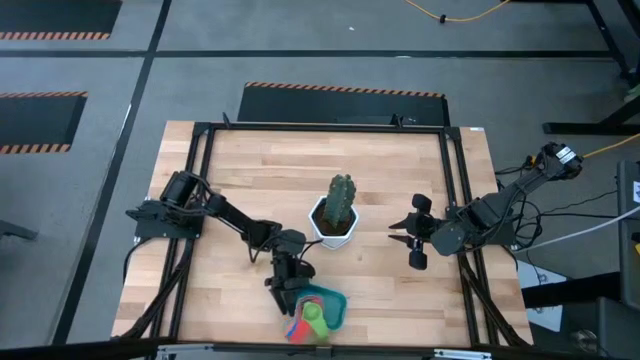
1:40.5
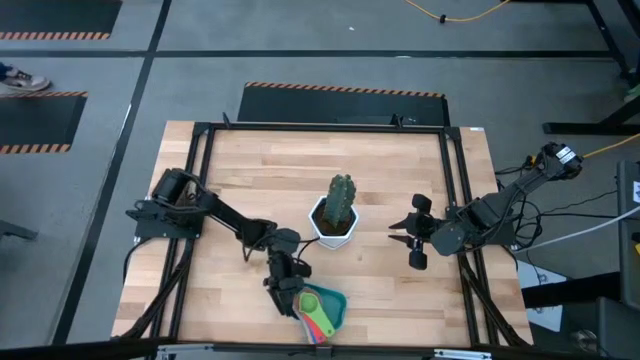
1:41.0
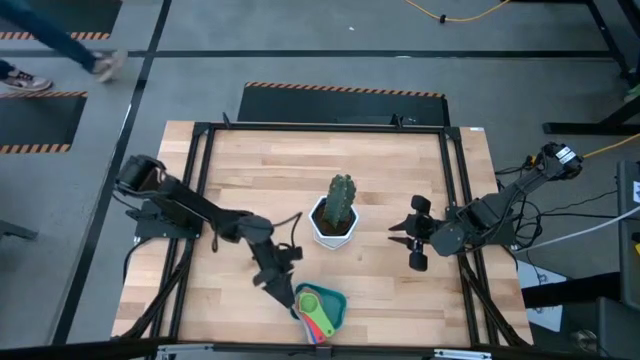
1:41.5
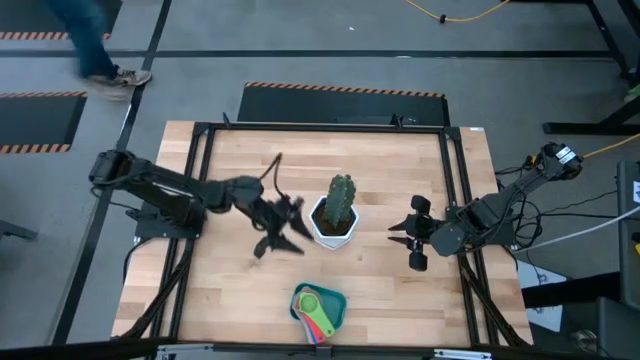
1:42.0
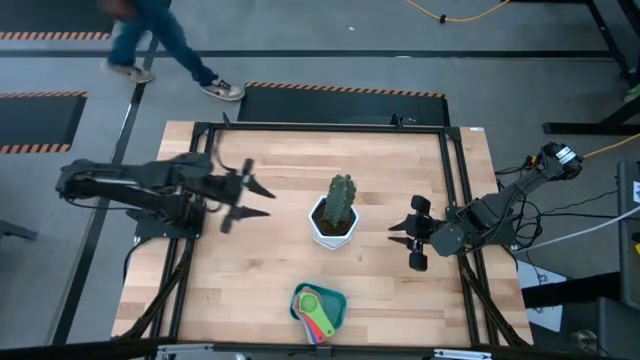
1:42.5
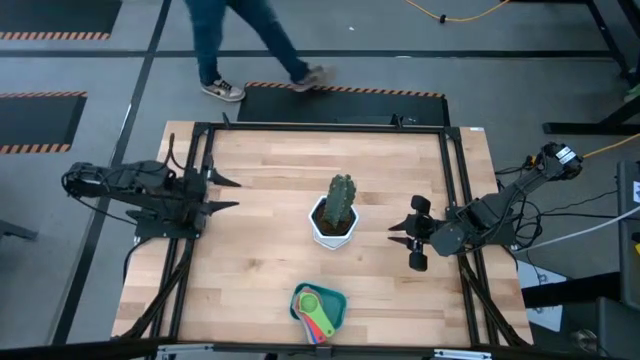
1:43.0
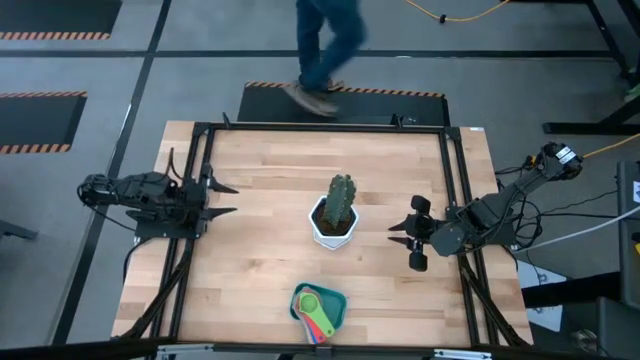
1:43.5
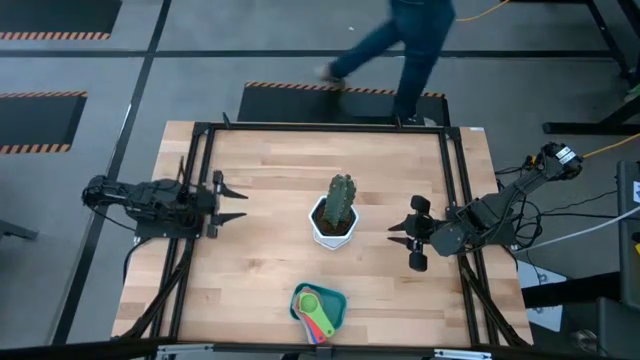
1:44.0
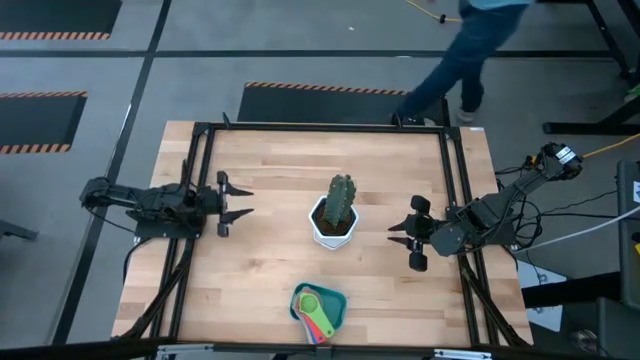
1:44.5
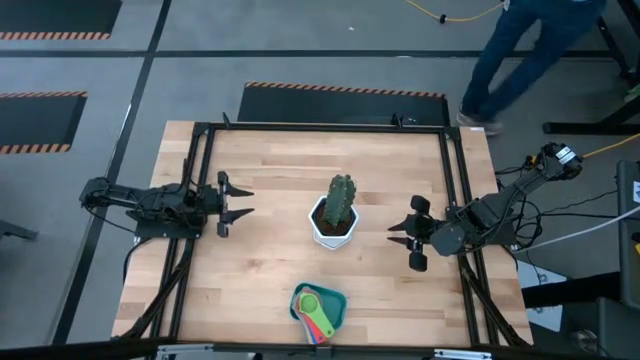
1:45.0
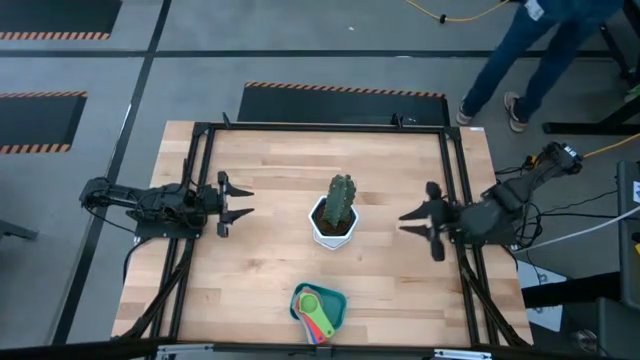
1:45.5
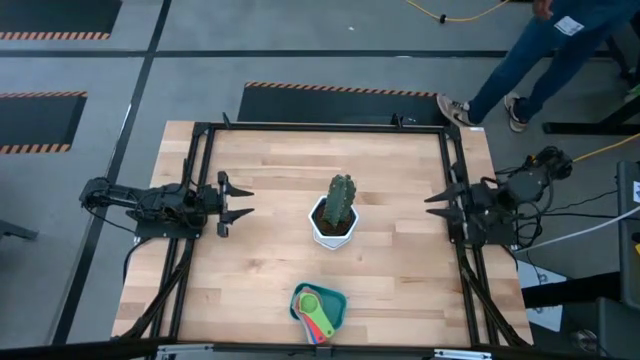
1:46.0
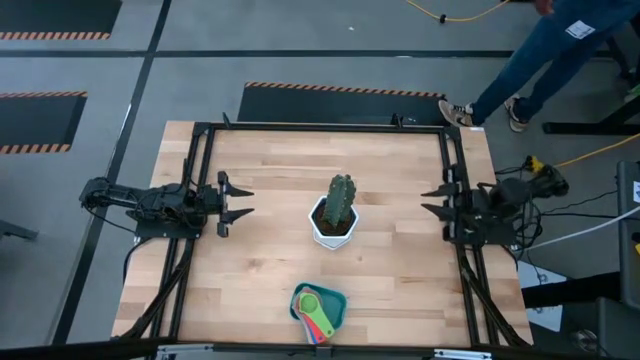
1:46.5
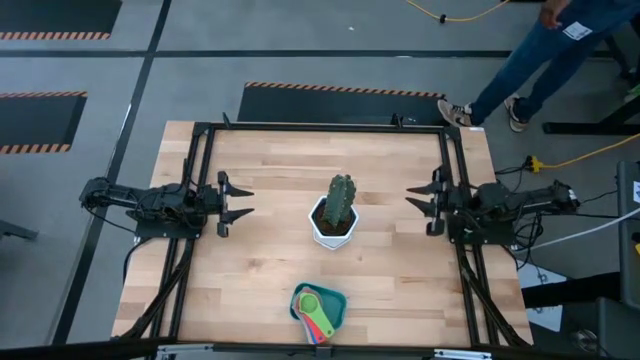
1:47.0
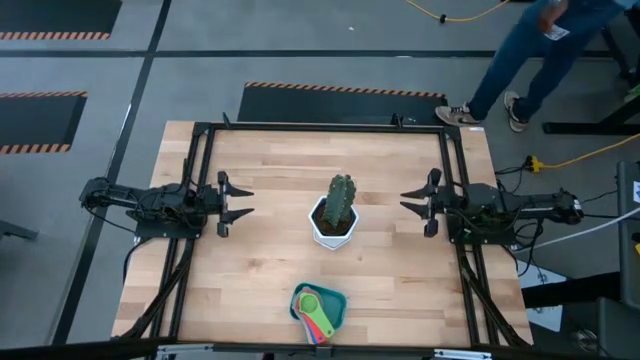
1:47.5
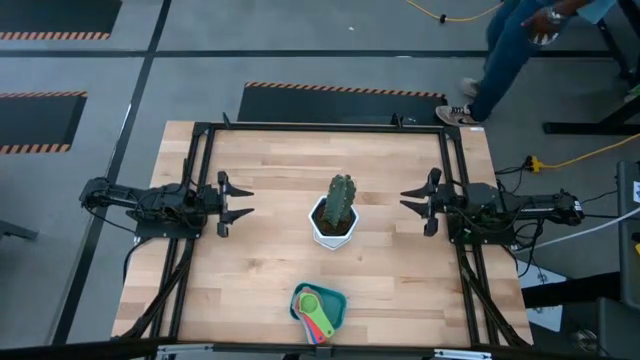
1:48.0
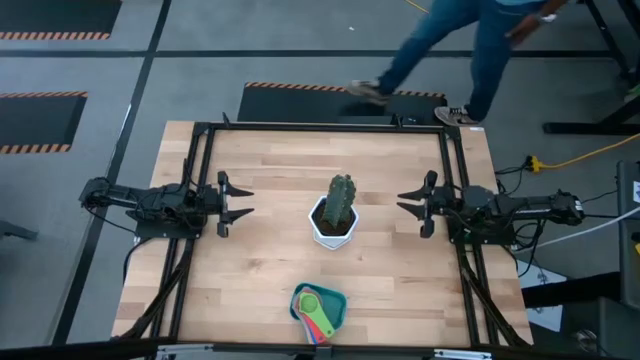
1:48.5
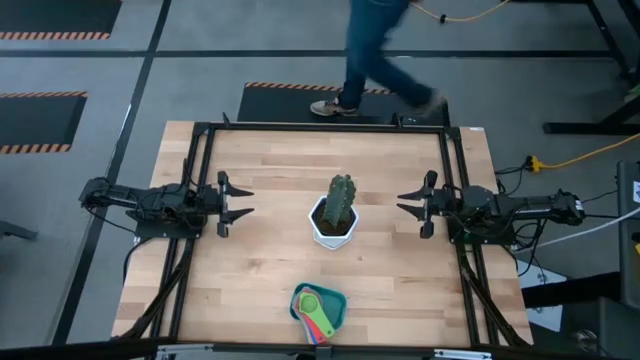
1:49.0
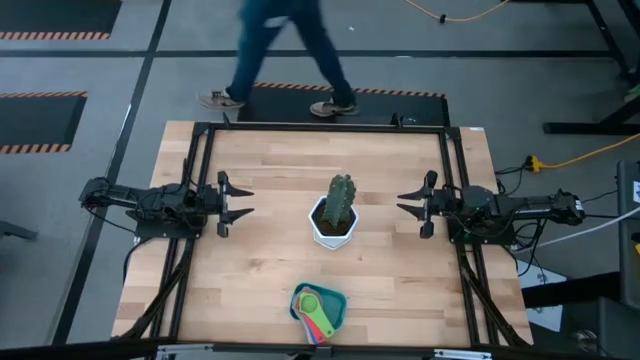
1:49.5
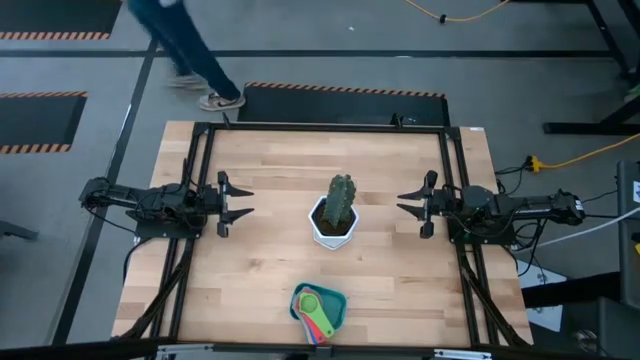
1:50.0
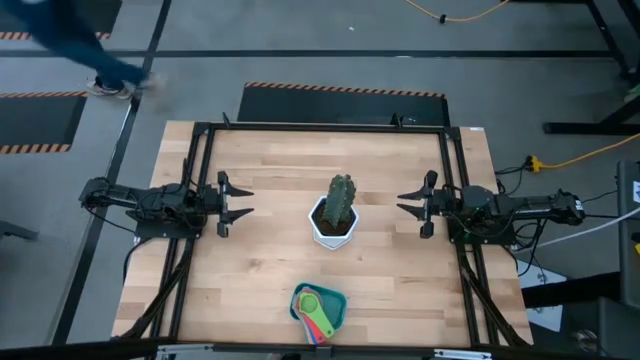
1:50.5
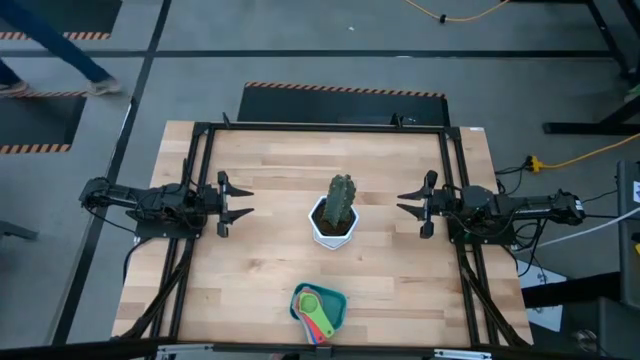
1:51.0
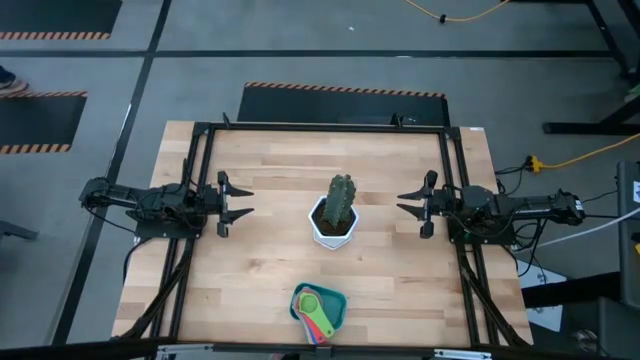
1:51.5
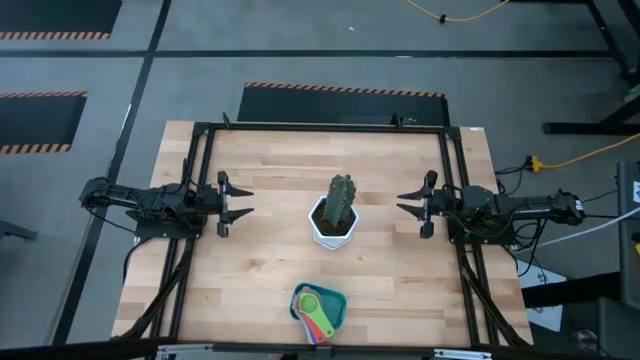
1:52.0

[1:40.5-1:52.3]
Task: Nest measuring cups in basket
Return to Home Position

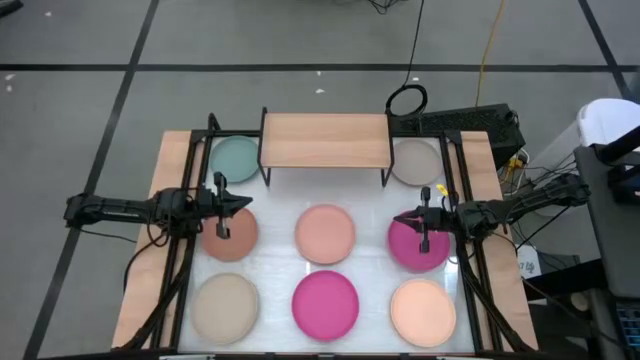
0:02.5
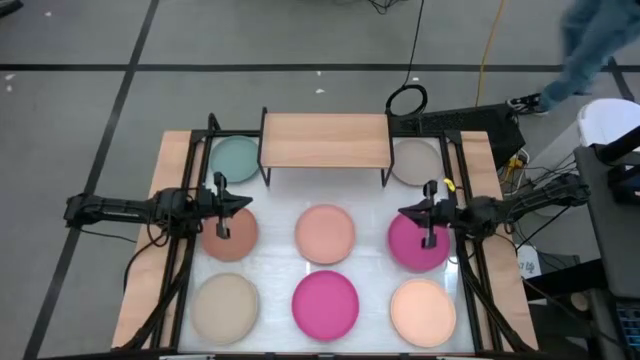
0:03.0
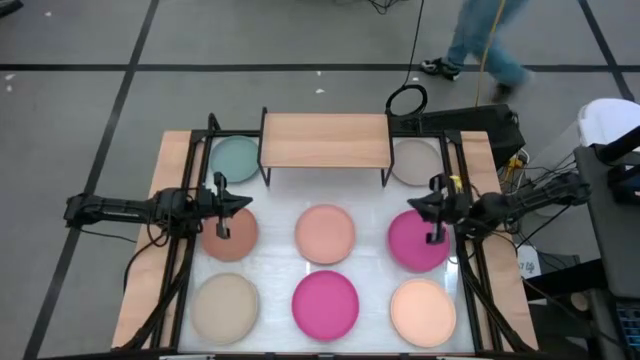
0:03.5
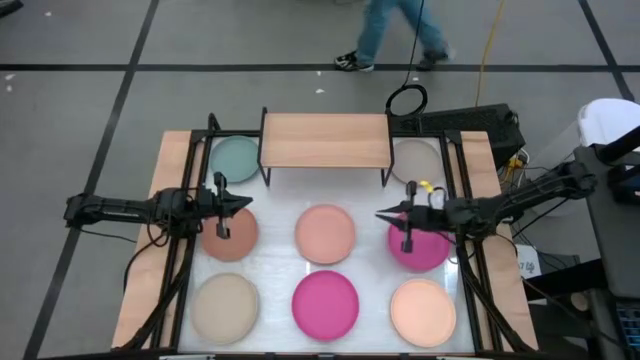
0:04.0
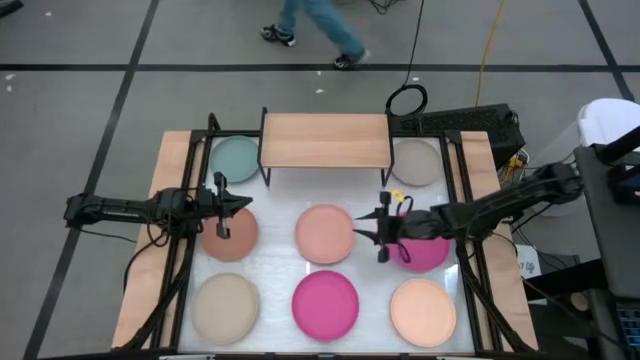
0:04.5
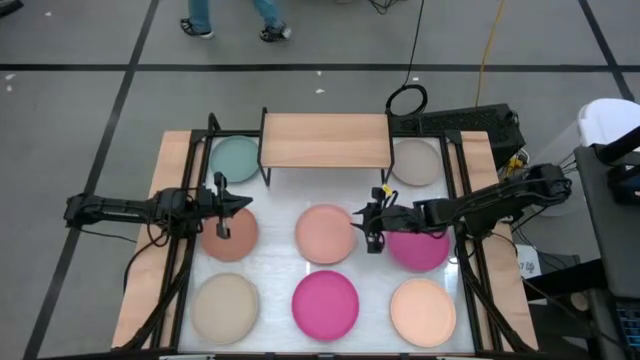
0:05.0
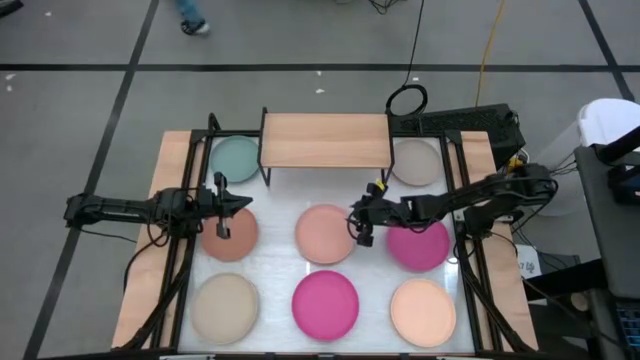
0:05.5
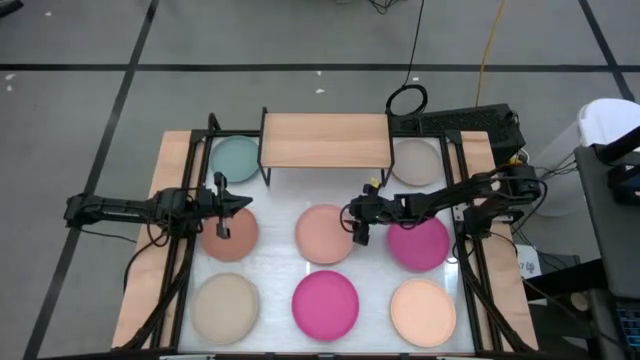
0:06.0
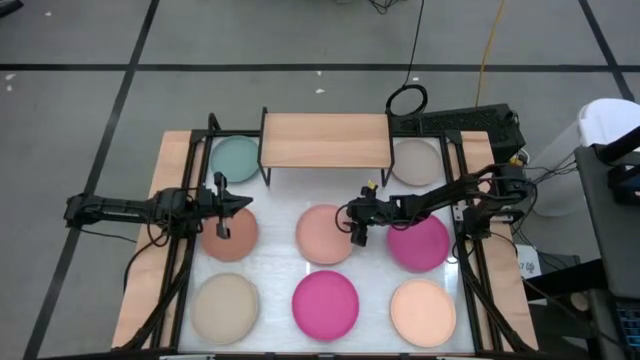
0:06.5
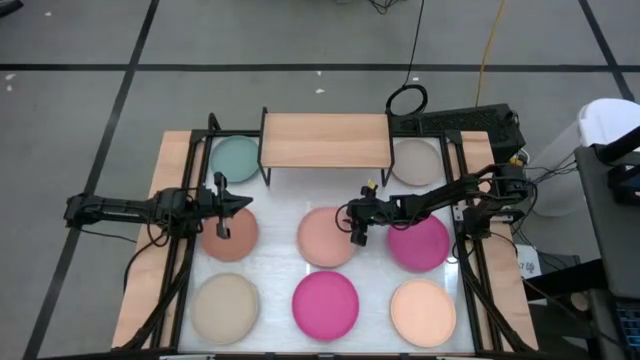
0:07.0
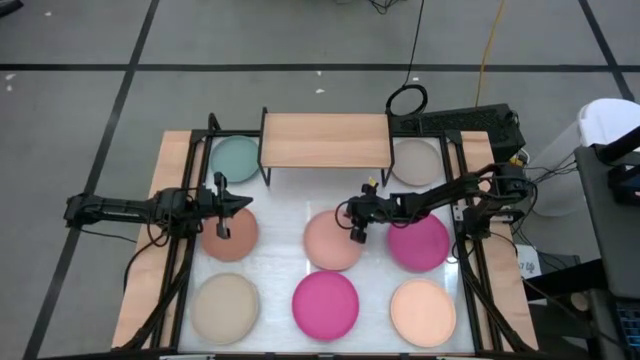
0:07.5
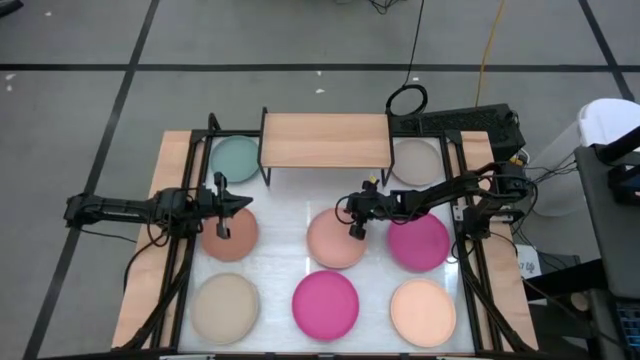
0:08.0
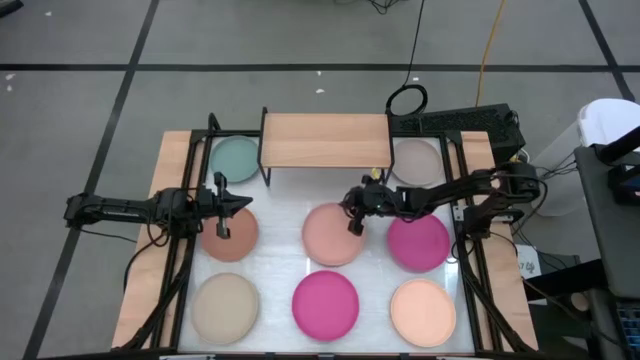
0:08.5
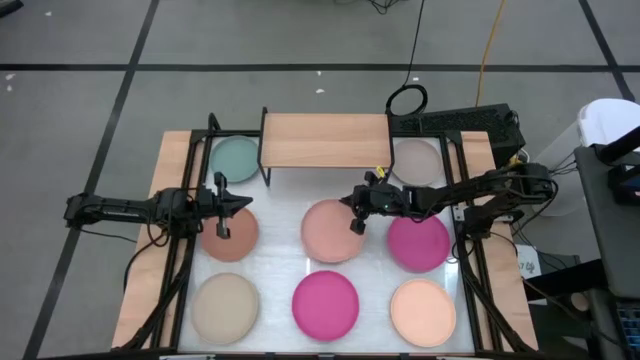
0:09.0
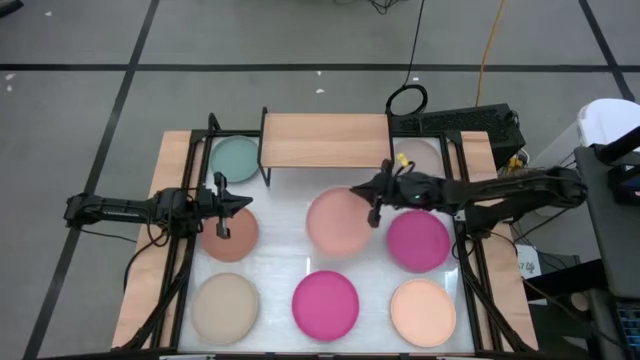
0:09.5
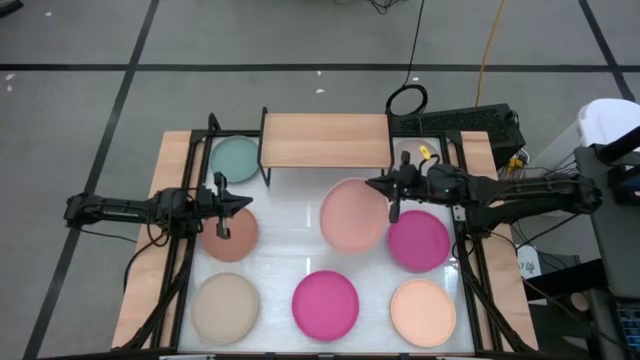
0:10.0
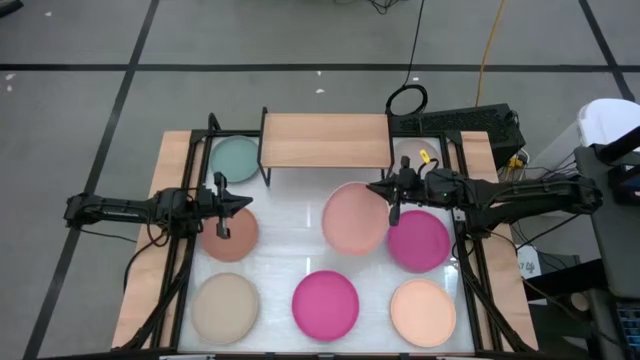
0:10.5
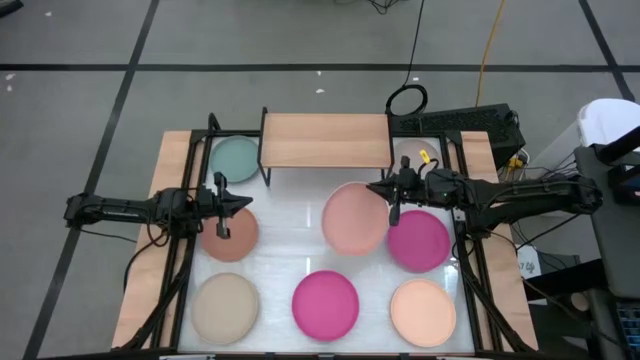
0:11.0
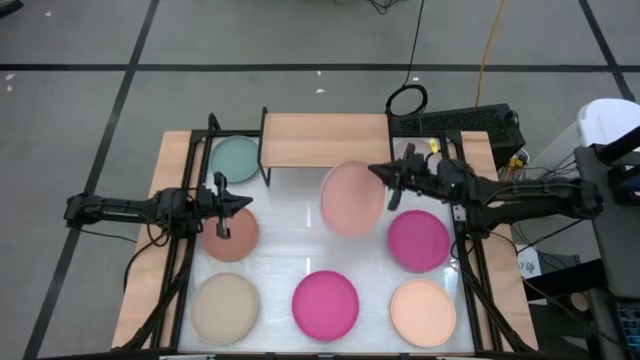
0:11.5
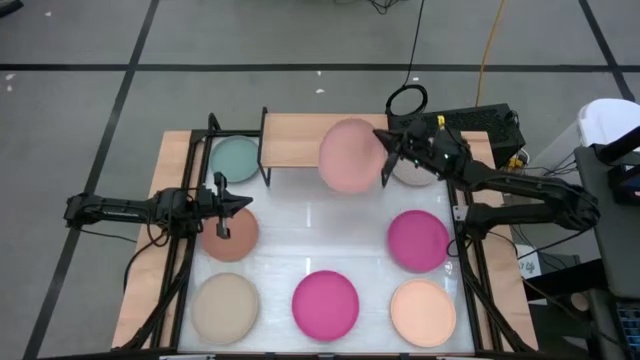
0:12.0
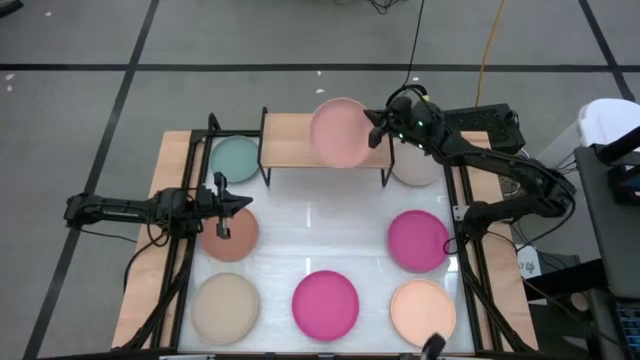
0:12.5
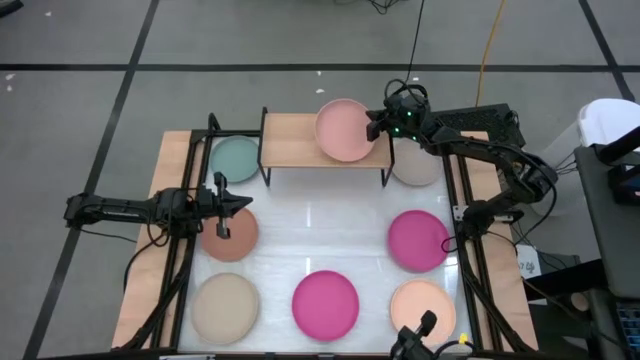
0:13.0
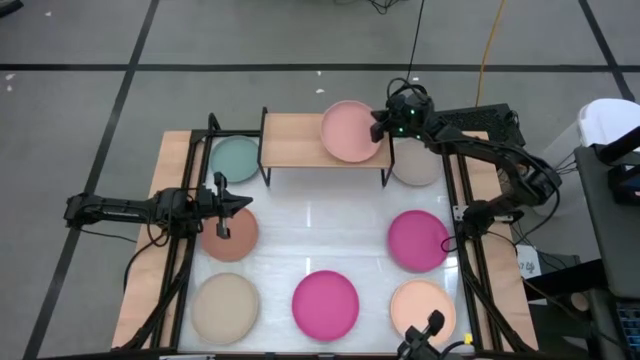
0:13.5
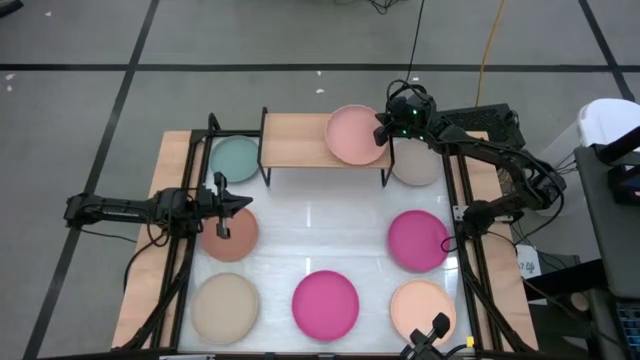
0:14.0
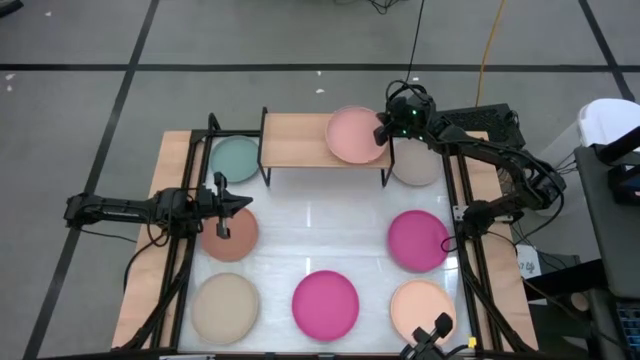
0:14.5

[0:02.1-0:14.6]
Task: Place and stack plates onto a shelf
Put the light pink plate on the shelf
